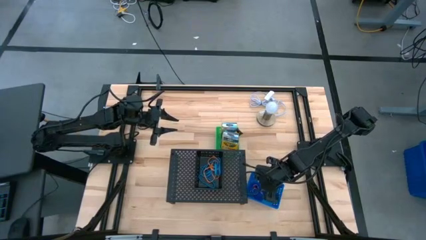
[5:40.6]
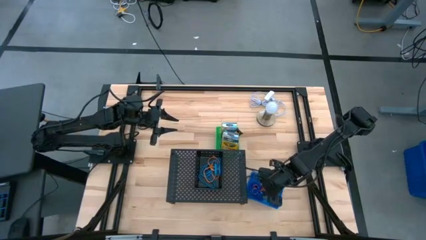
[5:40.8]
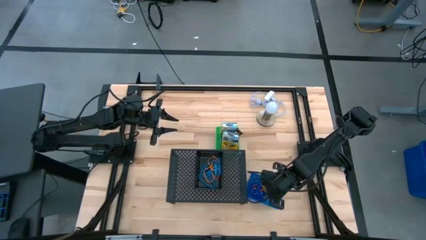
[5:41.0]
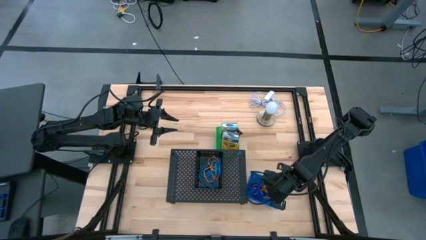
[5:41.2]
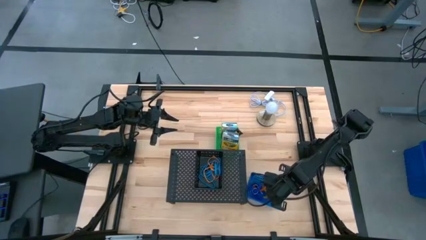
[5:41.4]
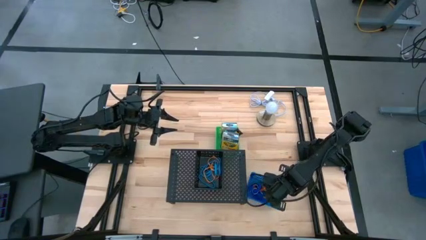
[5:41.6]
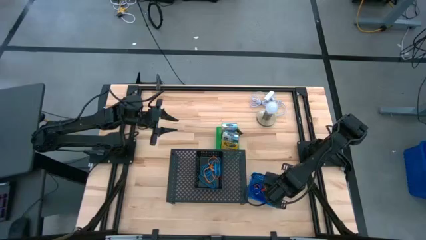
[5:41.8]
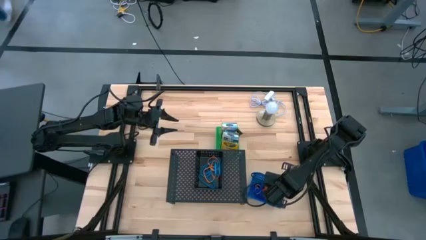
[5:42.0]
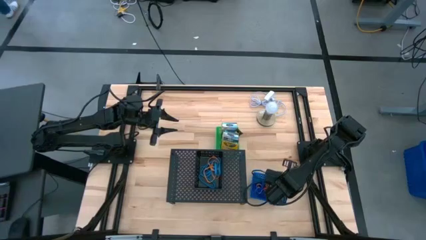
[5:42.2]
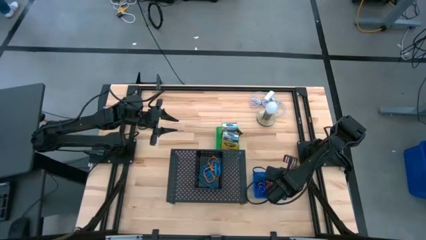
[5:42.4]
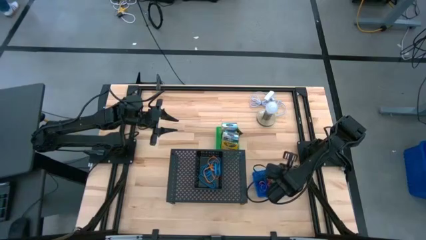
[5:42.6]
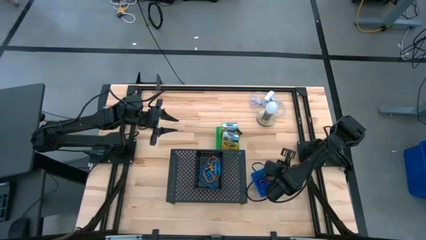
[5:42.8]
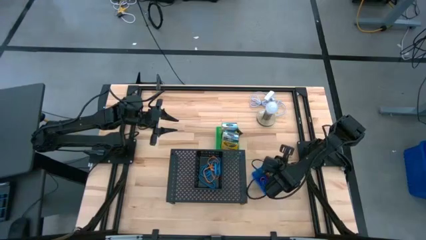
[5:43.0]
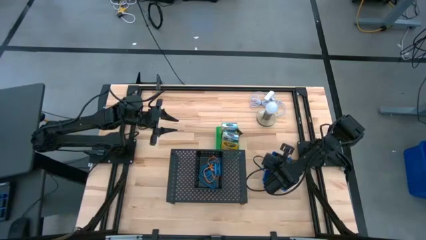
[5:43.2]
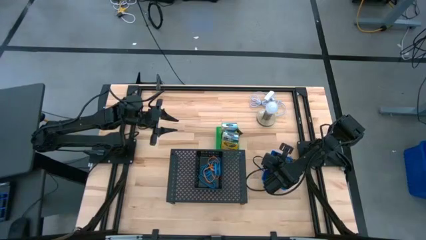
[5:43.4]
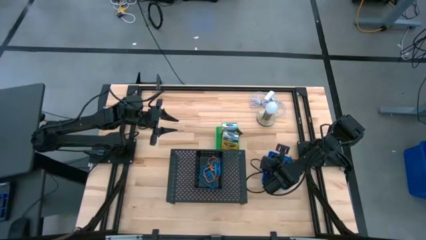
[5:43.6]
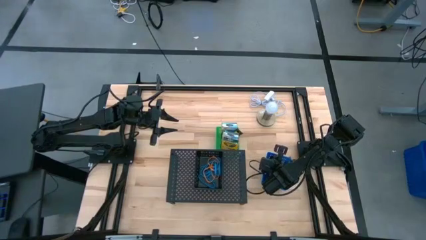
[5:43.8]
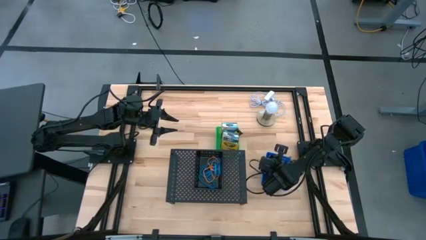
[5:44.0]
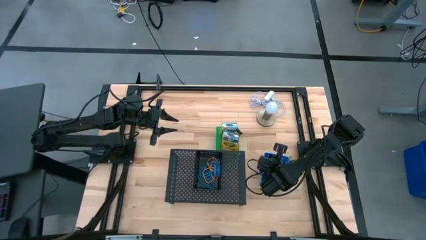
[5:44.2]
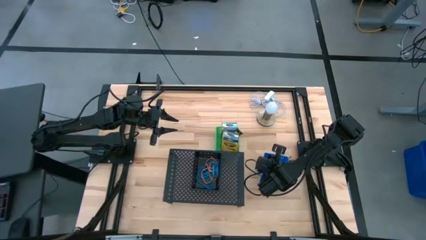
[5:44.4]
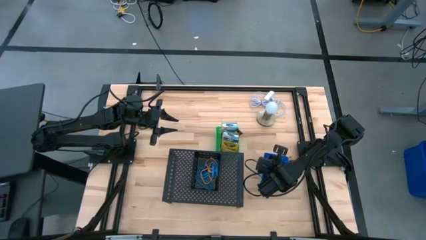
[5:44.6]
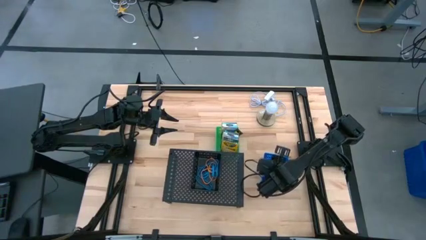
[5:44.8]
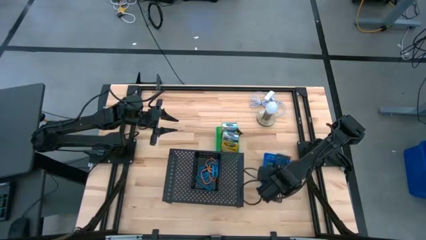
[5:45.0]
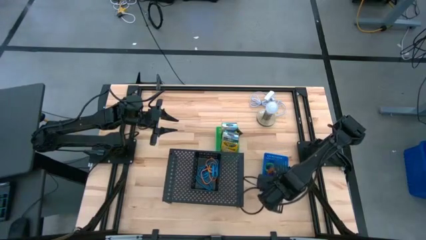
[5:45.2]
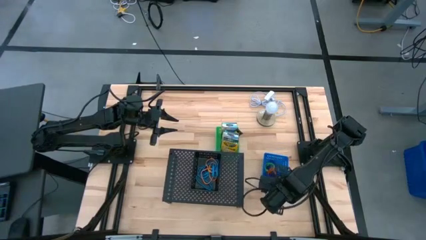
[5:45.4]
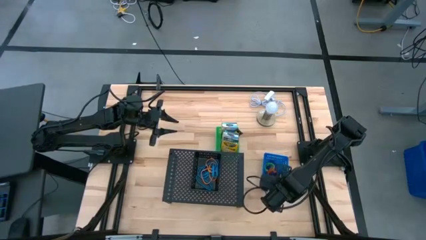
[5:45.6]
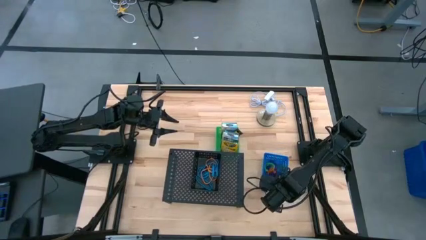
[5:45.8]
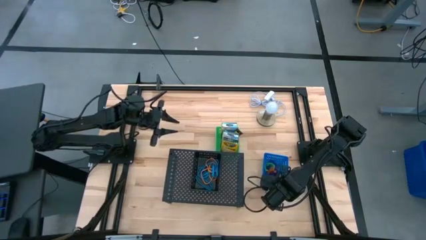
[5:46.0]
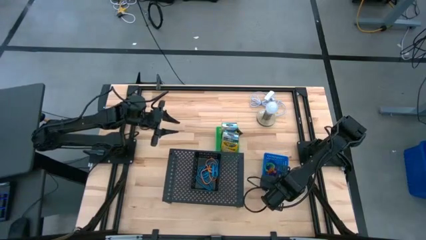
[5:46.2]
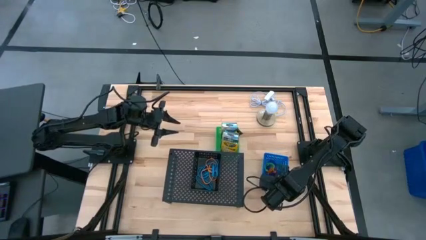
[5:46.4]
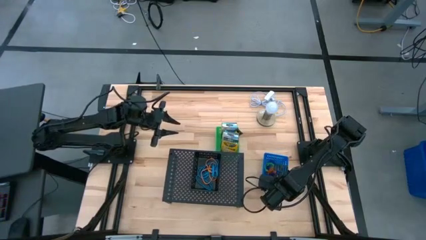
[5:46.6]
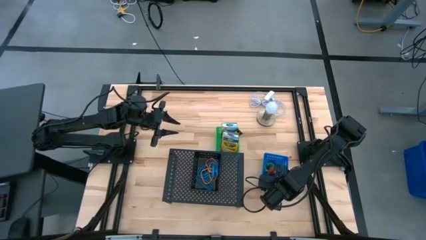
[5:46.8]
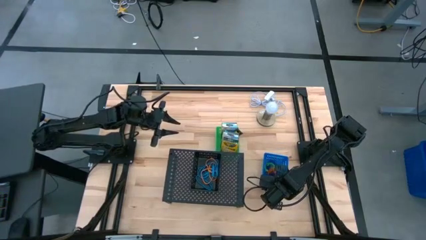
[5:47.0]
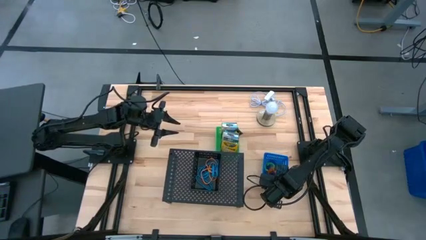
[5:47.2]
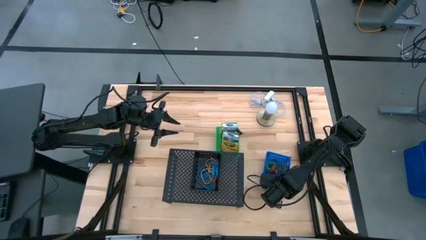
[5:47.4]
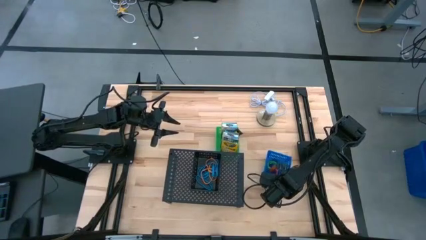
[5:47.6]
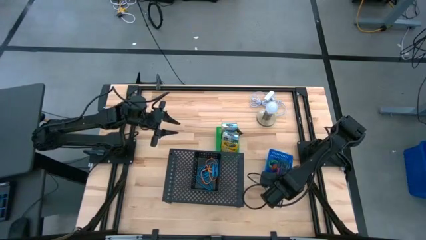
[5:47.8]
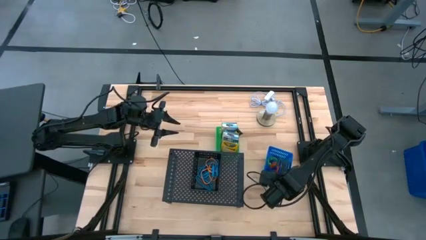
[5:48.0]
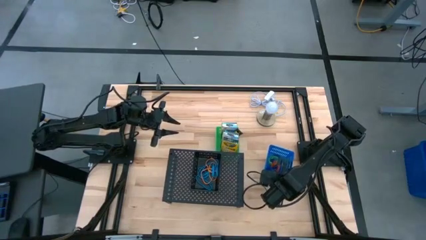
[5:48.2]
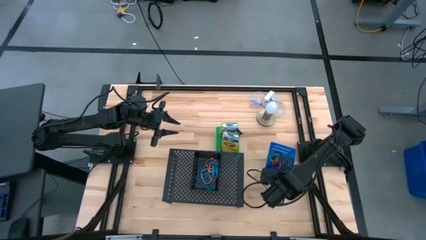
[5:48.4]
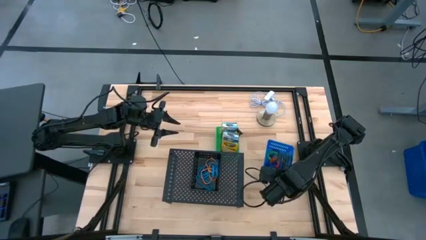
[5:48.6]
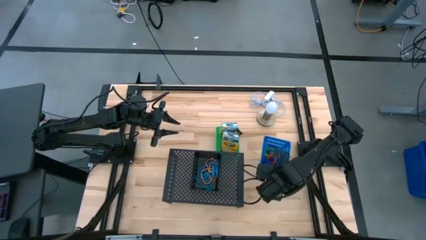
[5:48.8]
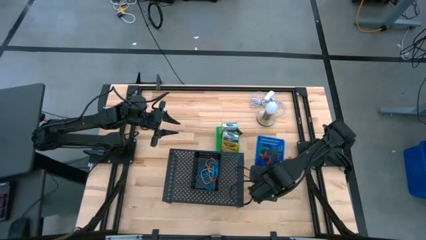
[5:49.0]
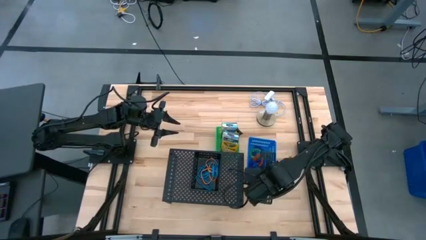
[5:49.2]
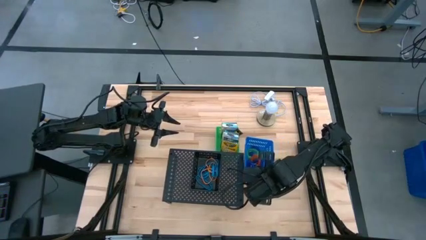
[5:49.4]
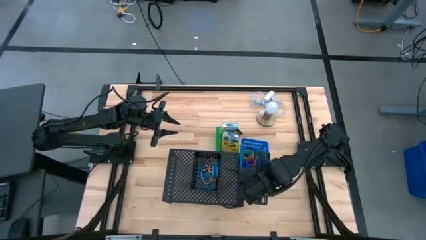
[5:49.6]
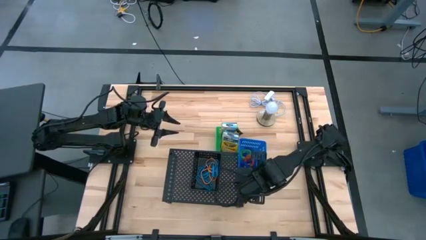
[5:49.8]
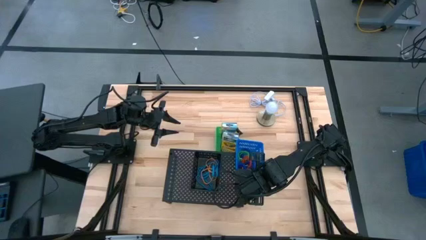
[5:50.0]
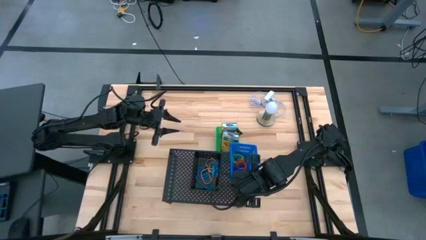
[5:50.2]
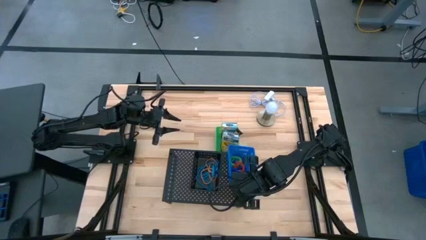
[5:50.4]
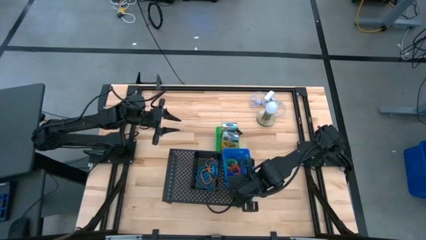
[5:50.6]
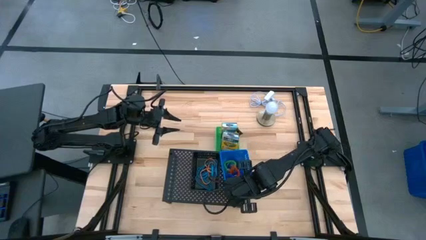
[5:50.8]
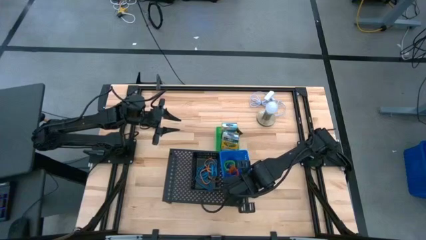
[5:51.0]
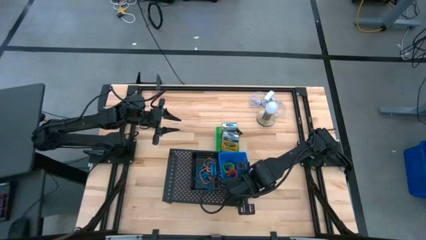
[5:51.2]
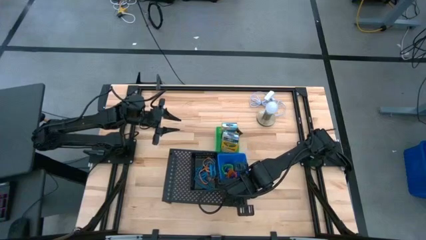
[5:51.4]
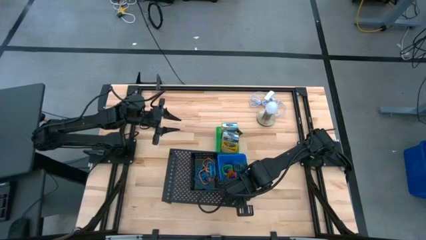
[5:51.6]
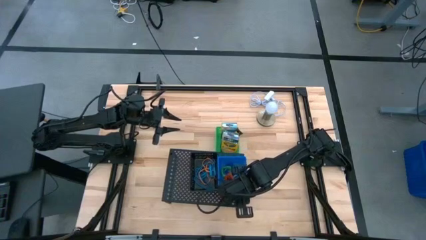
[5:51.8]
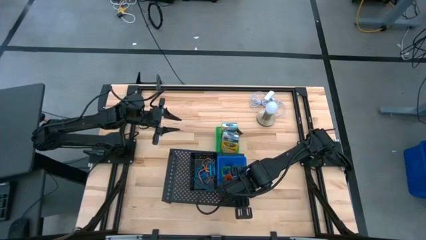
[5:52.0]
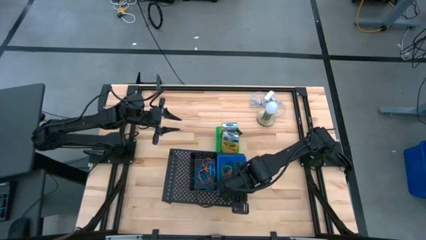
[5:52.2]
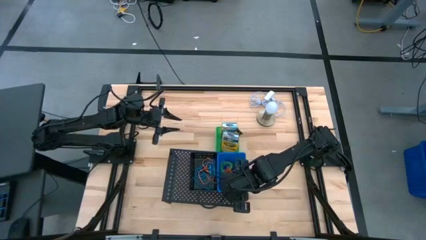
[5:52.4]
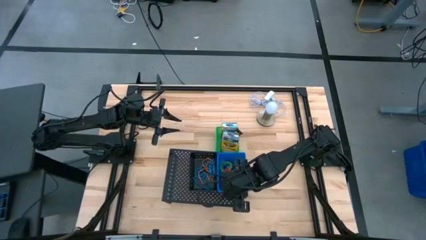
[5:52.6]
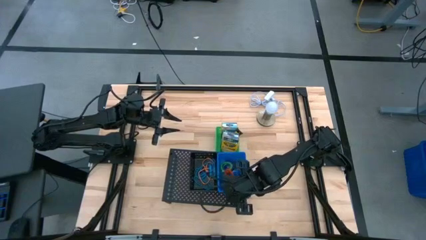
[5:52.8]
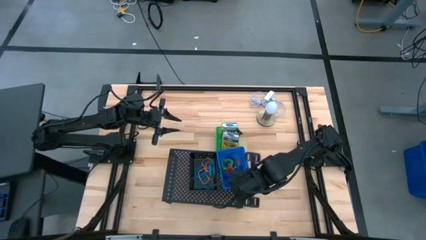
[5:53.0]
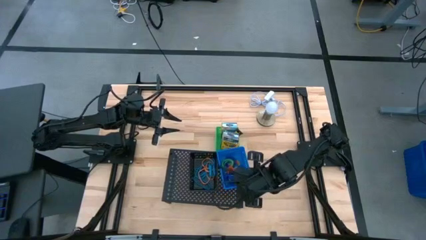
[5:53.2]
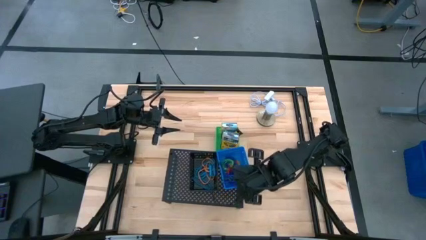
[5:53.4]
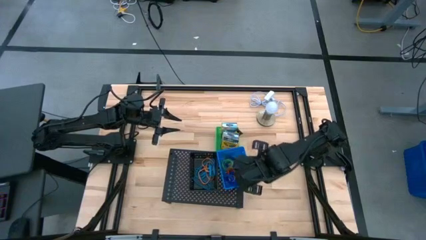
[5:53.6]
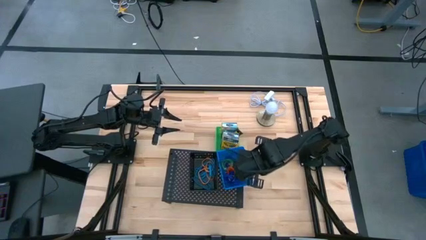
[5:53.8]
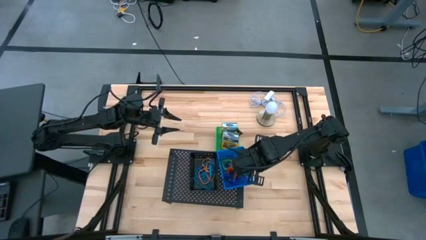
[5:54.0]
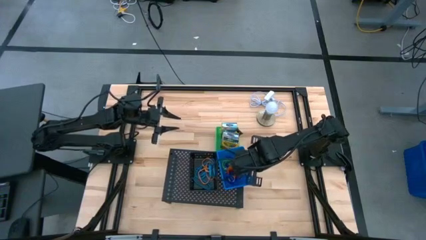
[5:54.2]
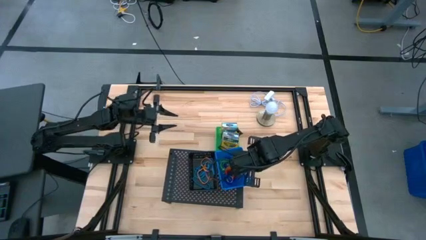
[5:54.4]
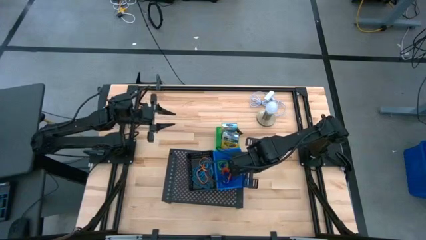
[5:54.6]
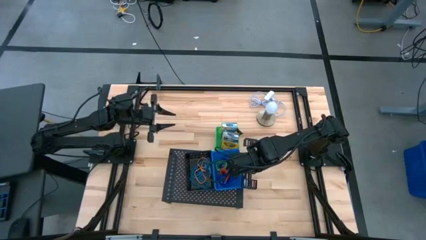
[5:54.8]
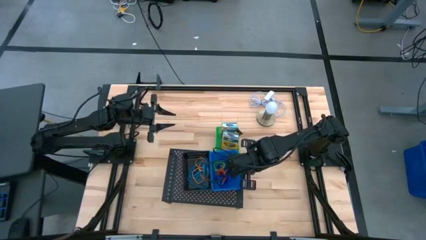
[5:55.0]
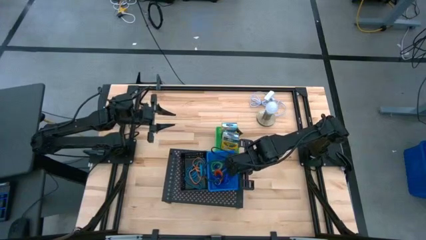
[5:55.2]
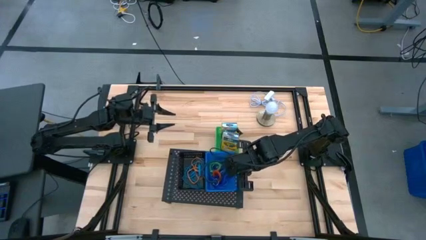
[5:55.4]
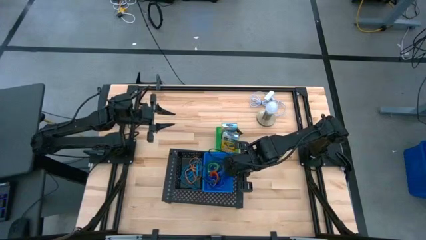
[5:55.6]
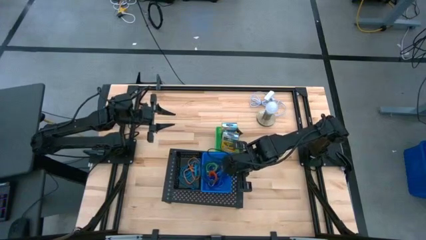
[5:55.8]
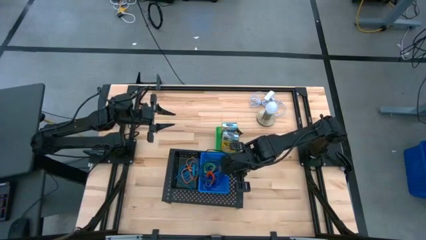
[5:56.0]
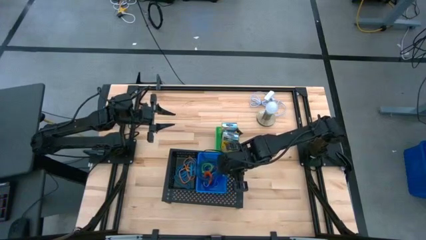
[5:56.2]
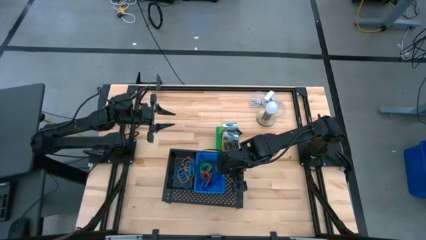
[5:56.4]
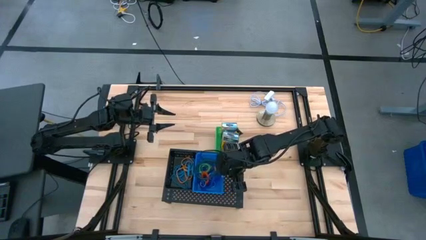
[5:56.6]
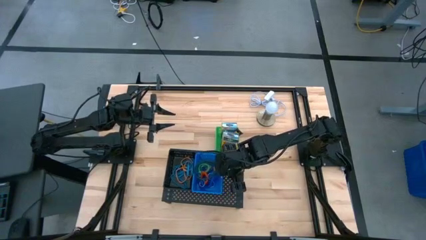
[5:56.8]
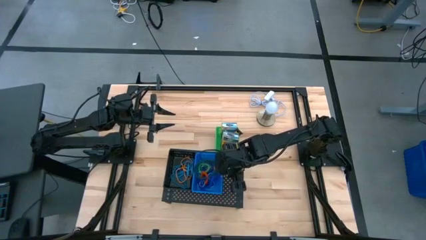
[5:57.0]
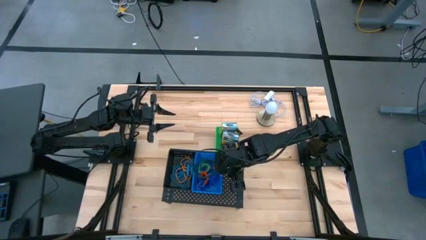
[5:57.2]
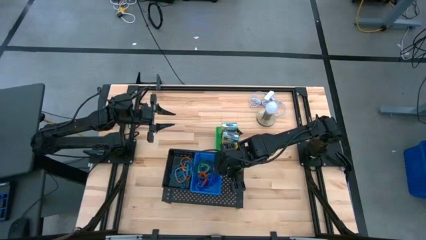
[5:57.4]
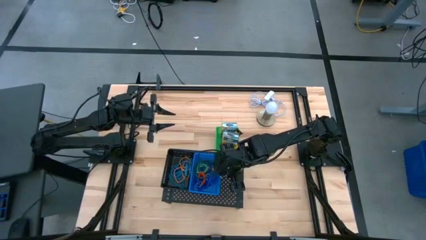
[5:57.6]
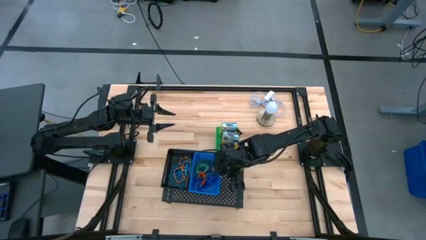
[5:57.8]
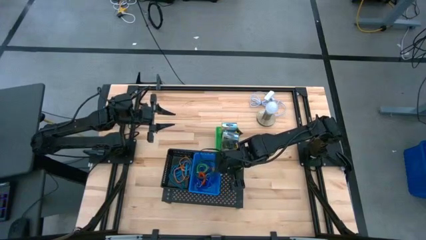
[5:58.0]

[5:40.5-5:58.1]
Task: Pick & Place Office Desk Supplies
Put the blue bin with the spring keychains on the shelf
